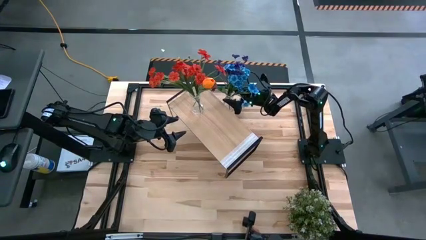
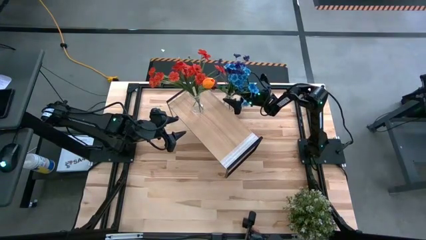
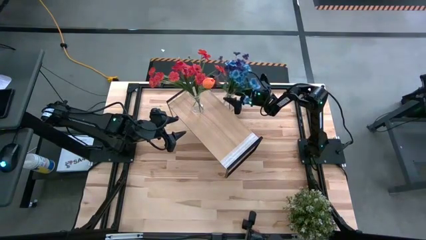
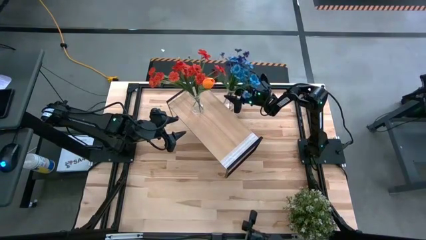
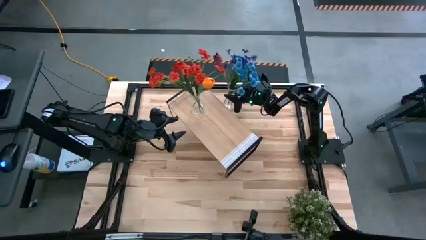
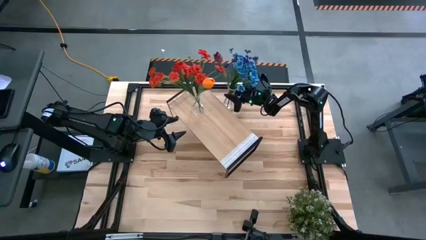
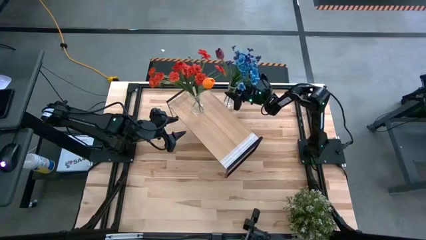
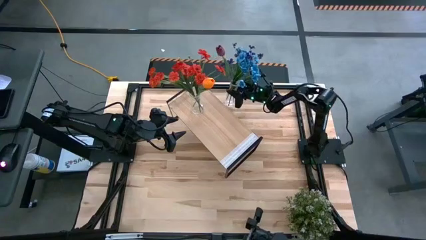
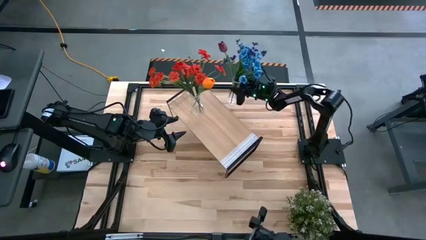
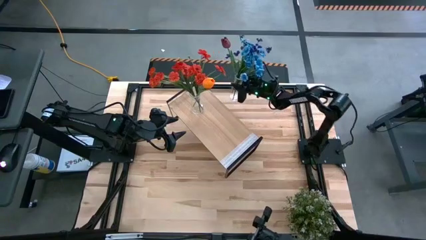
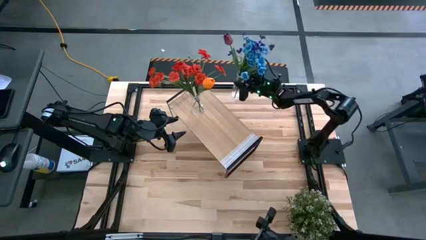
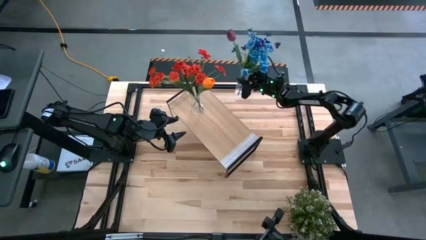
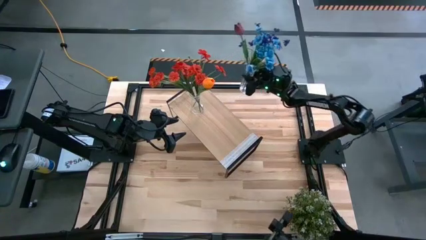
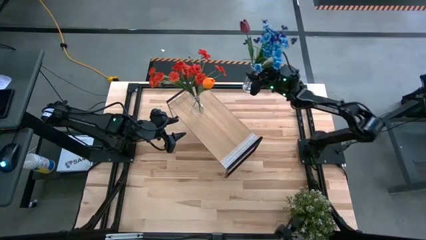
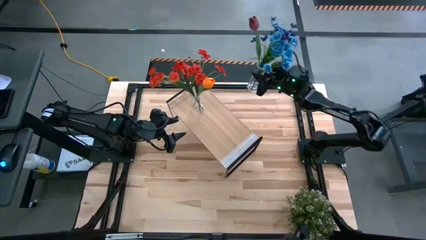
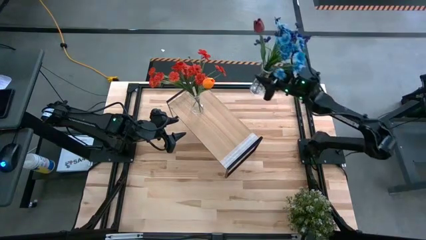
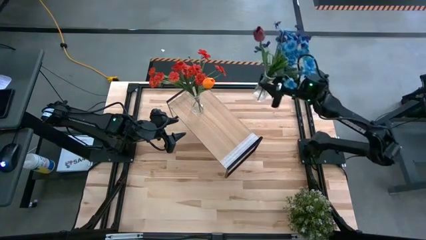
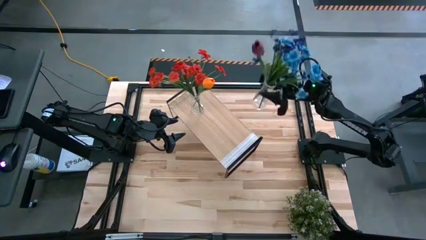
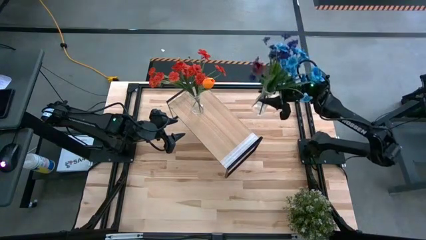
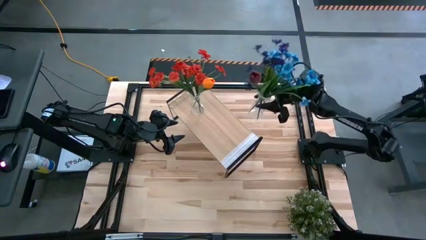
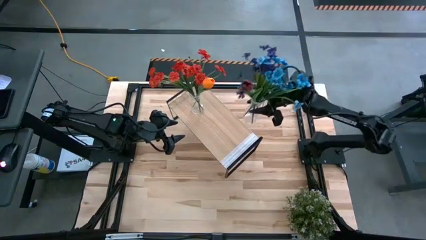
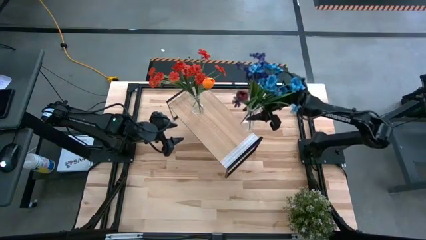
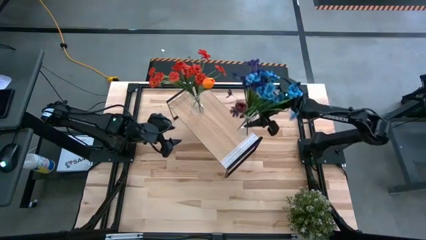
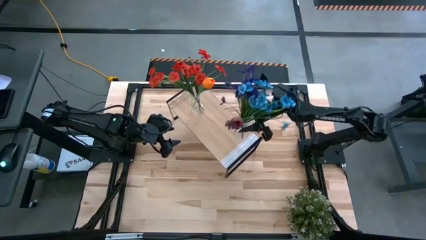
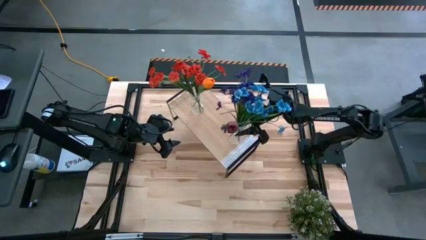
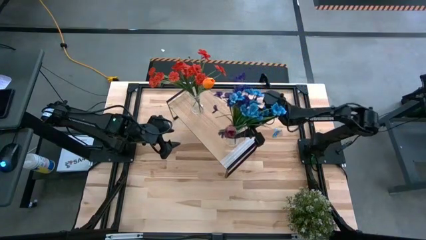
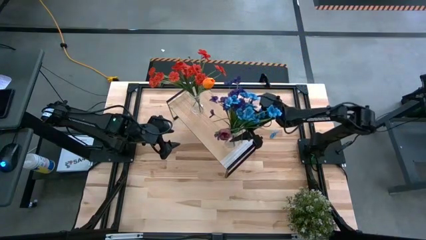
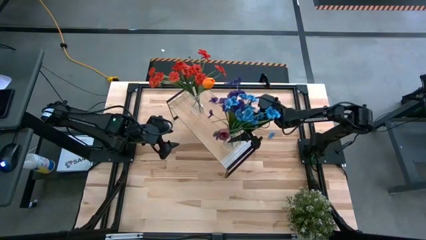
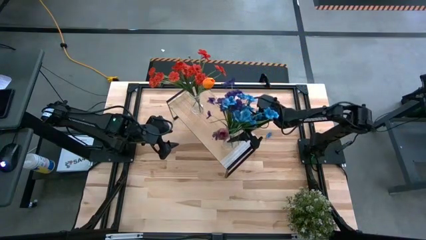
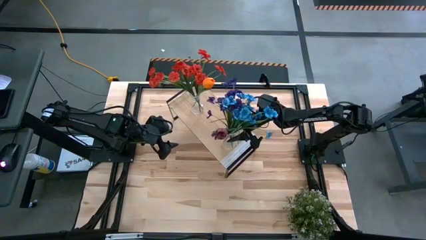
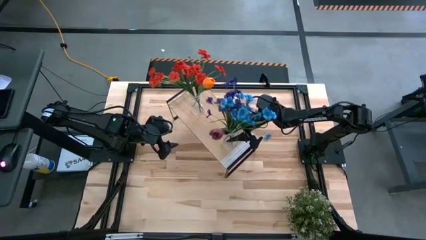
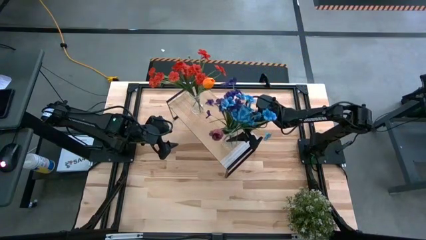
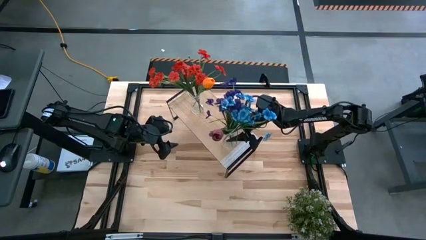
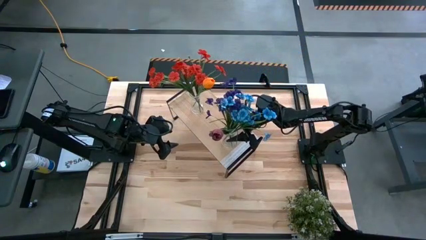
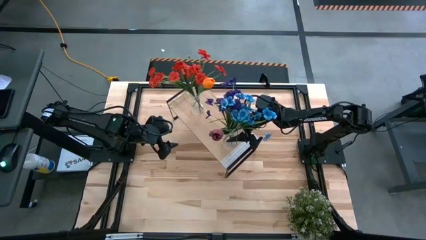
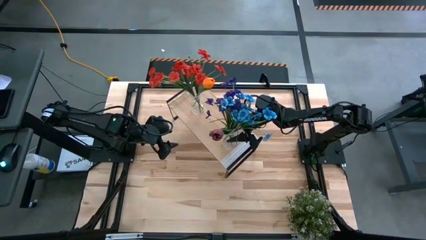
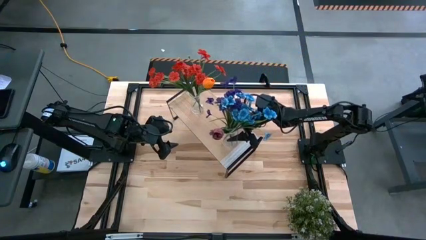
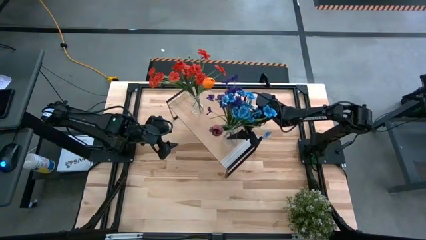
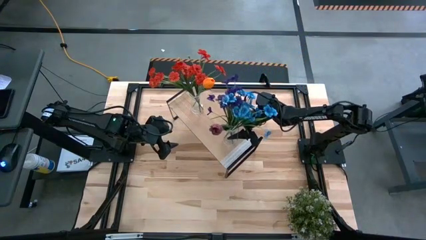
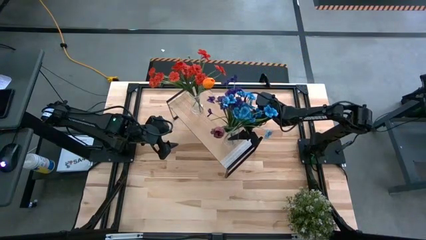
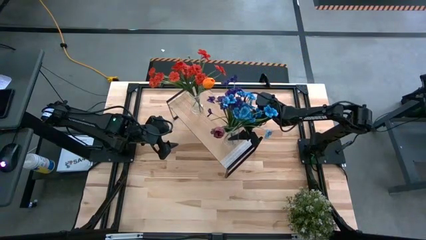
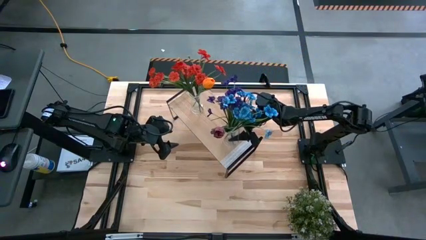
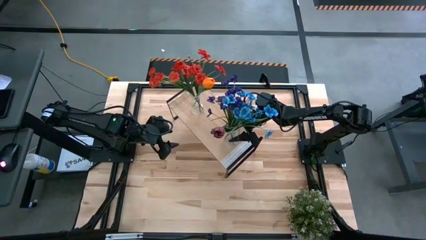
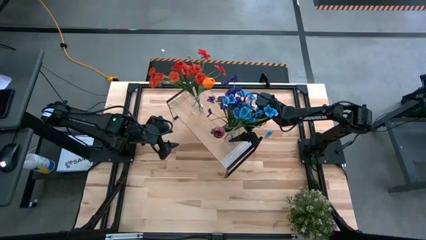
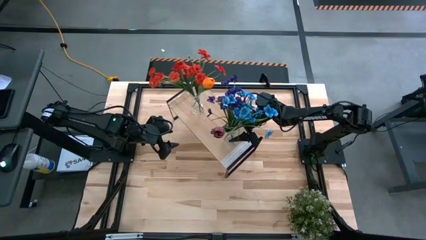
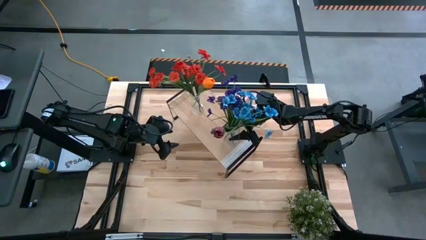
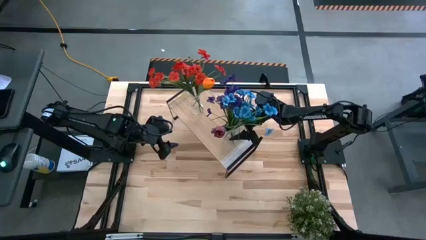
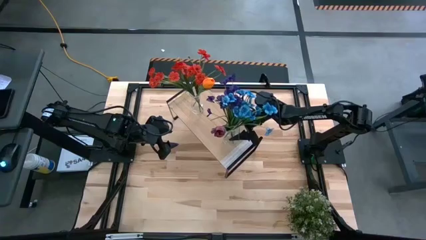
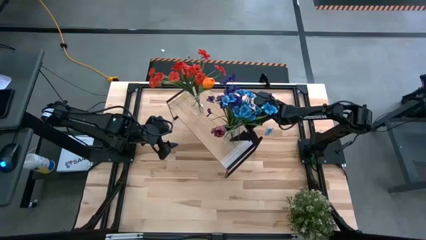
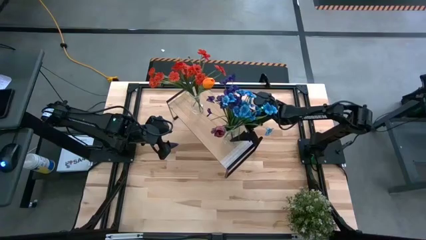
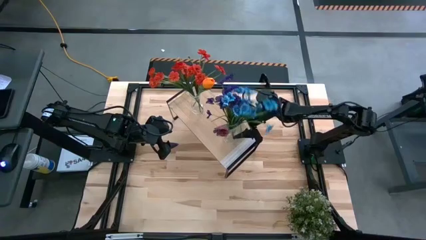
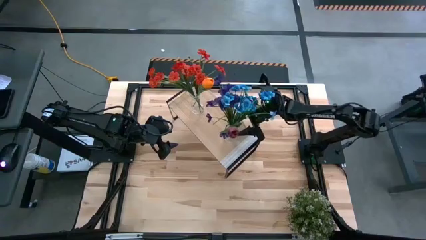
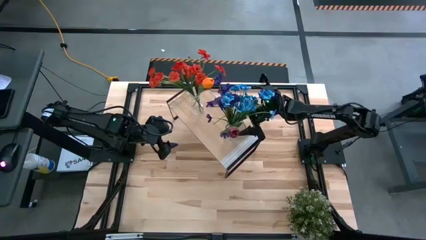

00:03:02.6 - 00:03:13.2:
Task: Pick and place flowers into a vace then onto a shelf
Put the transparent vase with flowers on the shelf

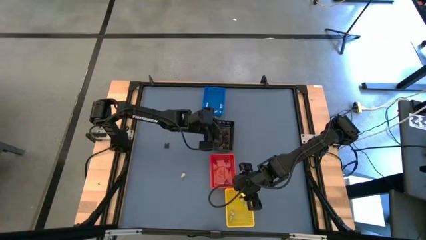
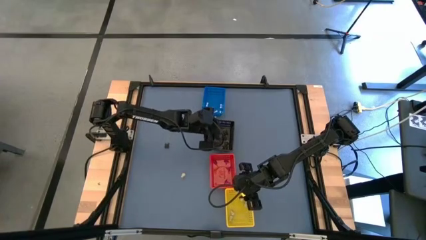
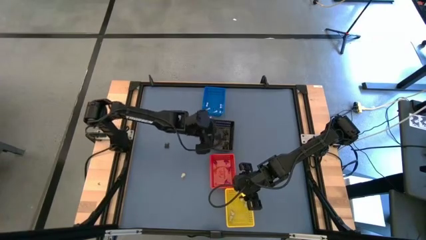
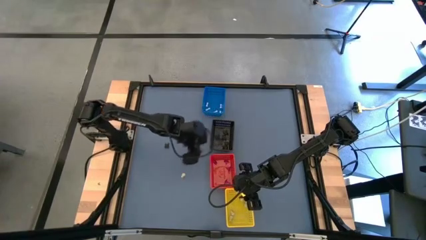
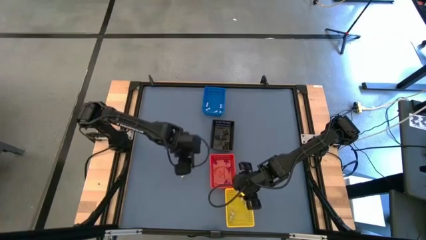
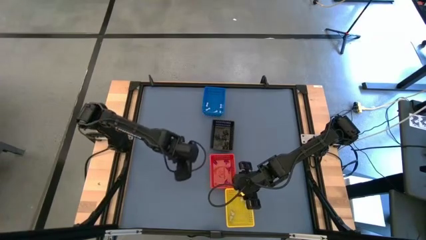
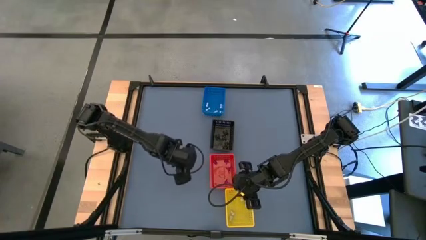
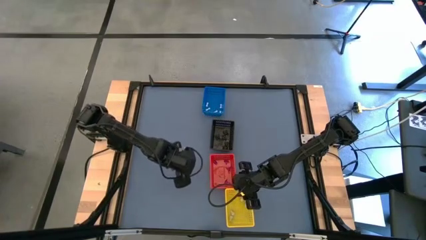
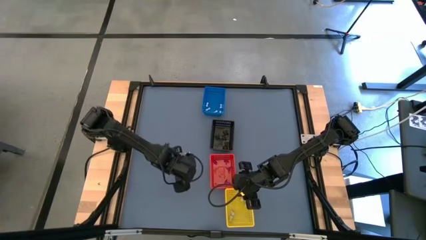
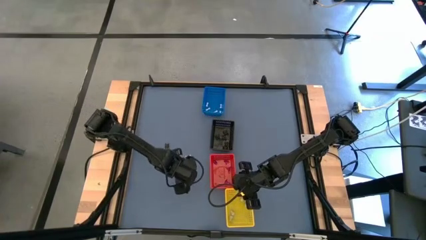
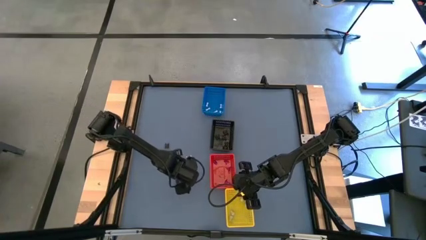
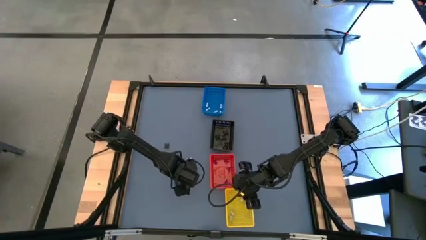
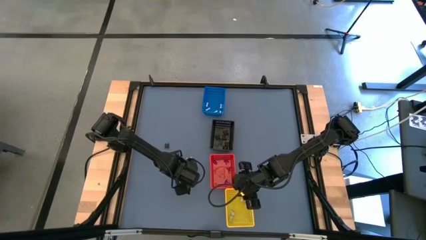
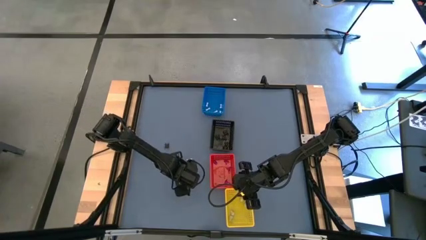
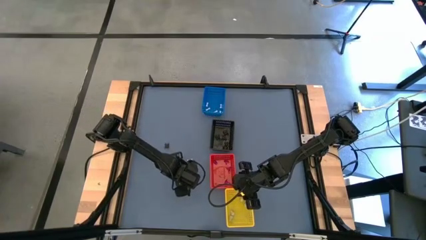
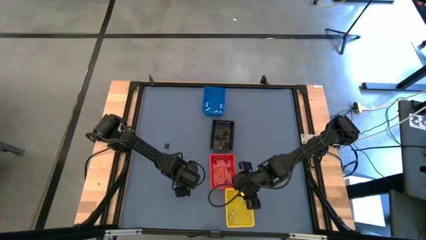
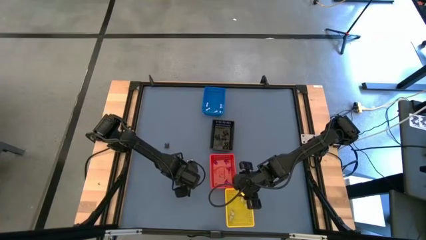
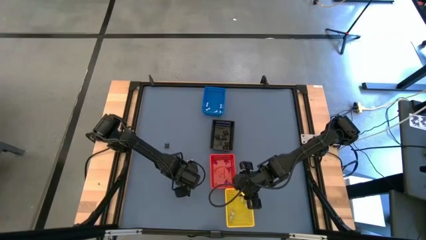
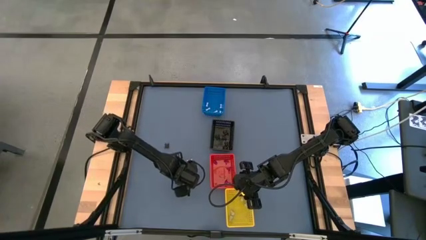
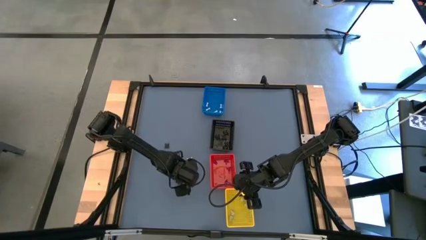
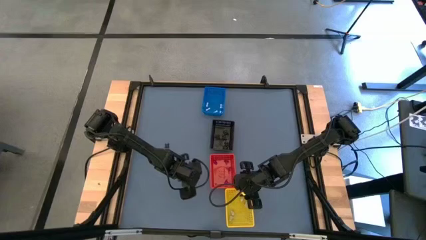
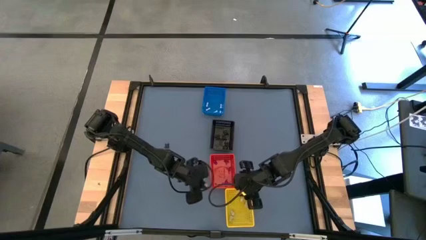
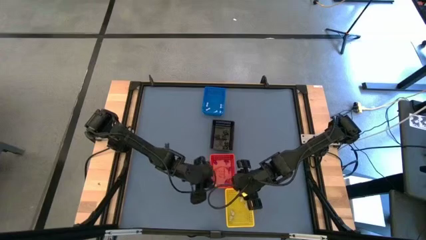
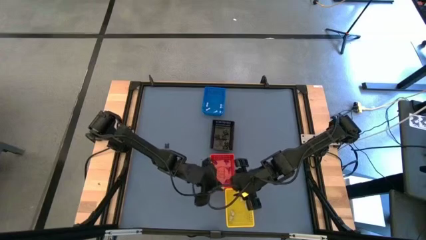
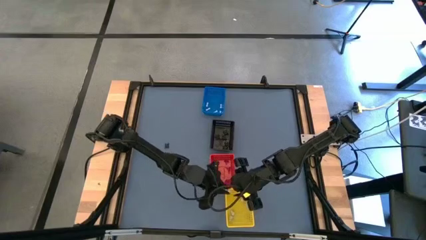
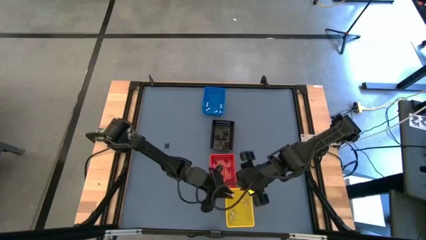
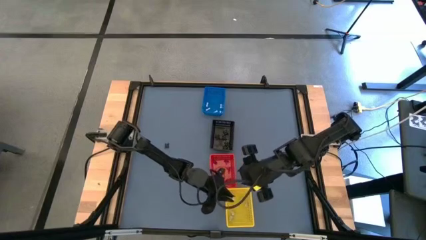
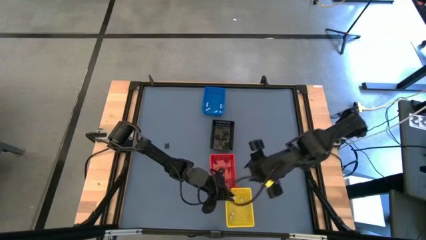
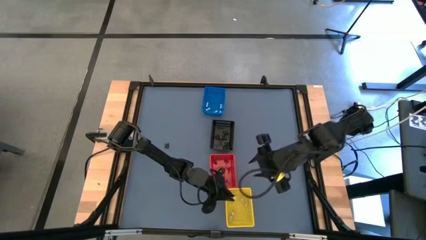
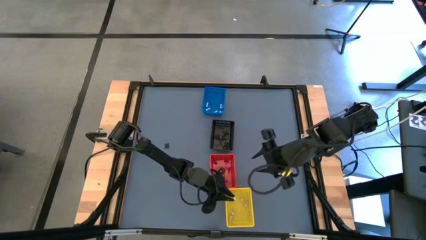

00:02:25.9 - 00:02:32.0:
Task: Sort Halloween decoration
Put the brown skull toy into the yellow bin
